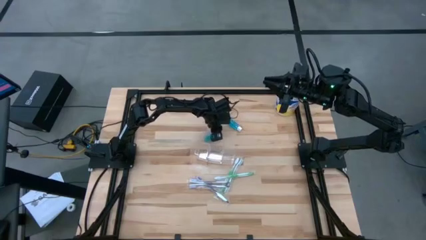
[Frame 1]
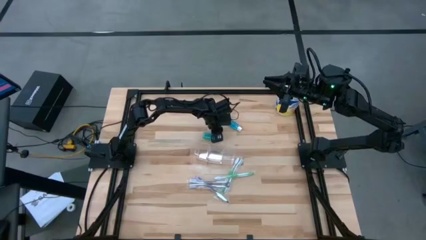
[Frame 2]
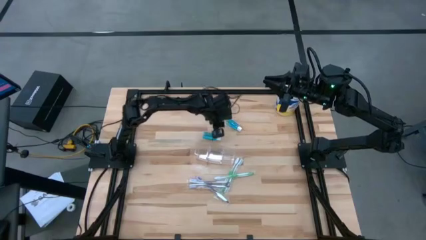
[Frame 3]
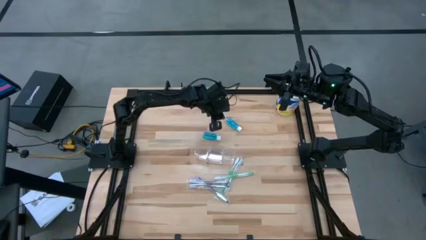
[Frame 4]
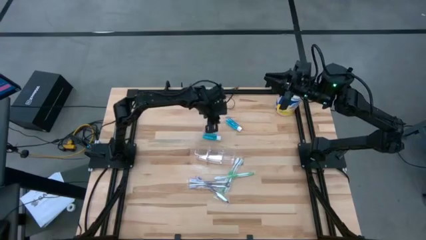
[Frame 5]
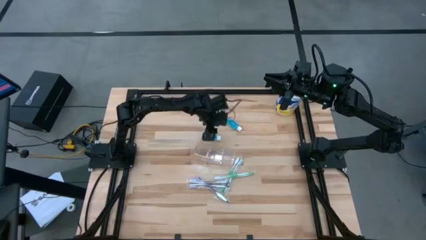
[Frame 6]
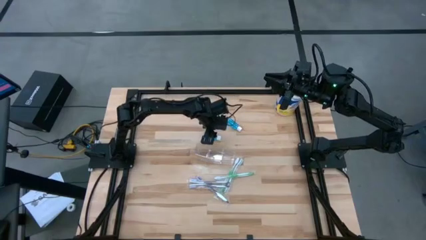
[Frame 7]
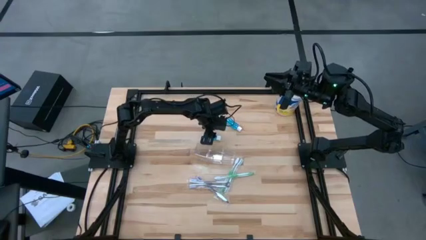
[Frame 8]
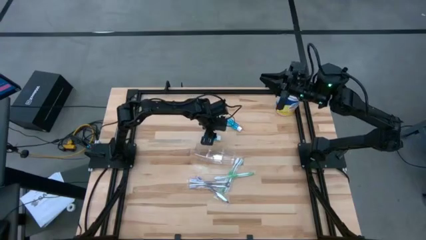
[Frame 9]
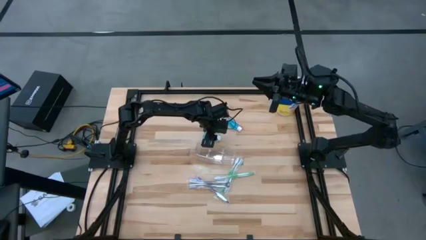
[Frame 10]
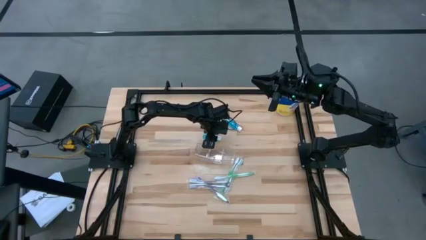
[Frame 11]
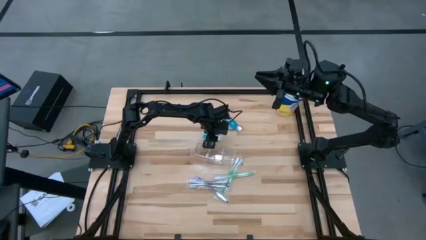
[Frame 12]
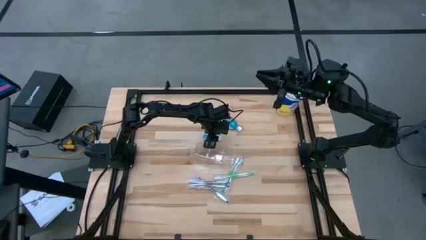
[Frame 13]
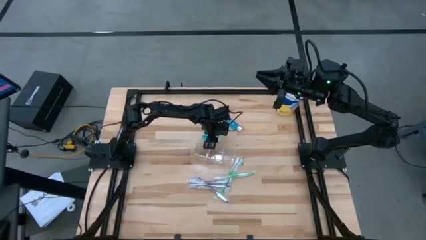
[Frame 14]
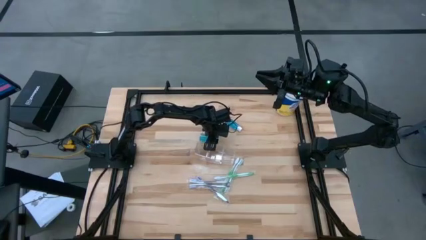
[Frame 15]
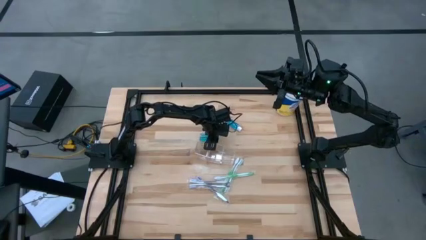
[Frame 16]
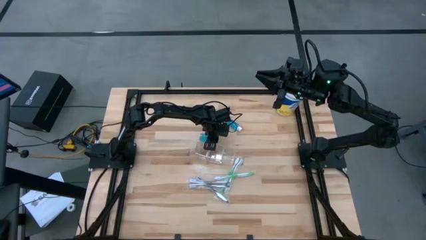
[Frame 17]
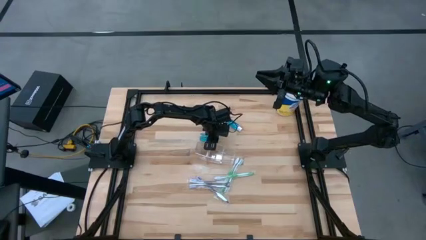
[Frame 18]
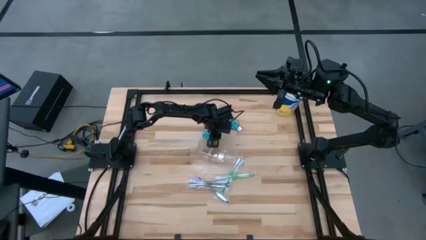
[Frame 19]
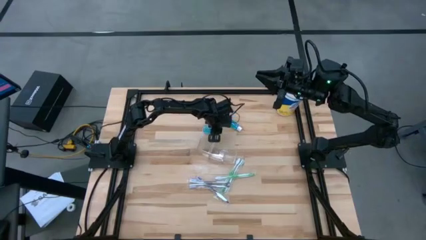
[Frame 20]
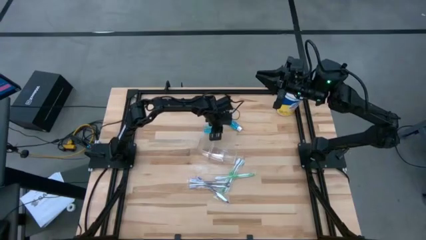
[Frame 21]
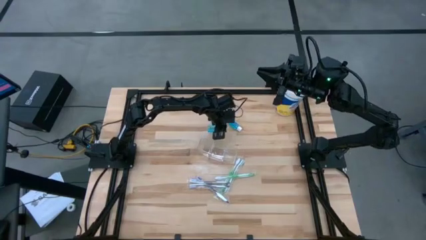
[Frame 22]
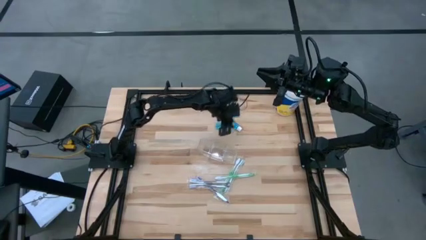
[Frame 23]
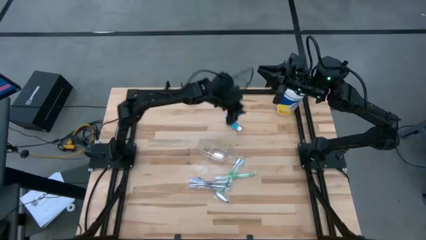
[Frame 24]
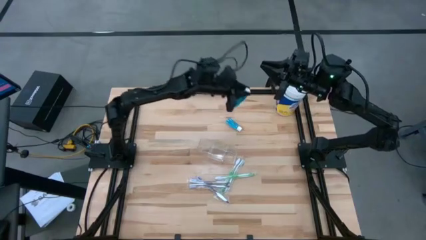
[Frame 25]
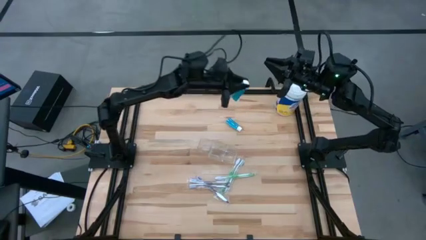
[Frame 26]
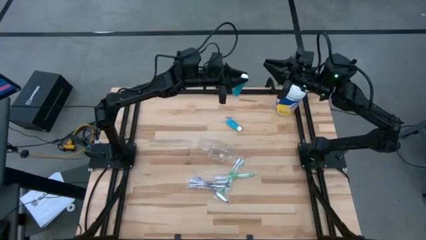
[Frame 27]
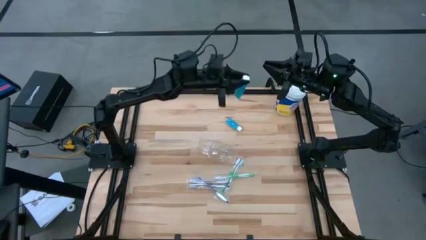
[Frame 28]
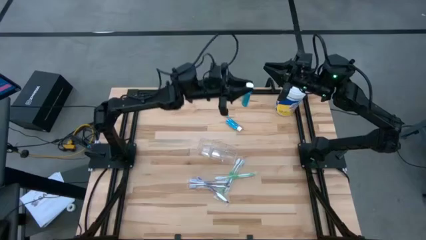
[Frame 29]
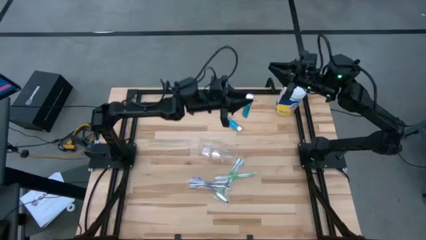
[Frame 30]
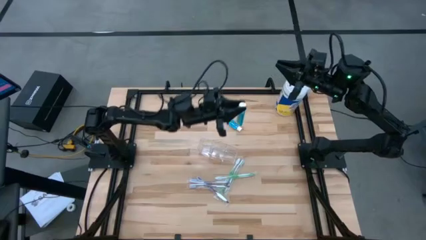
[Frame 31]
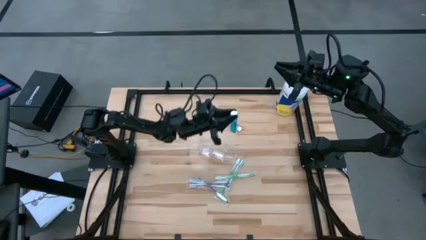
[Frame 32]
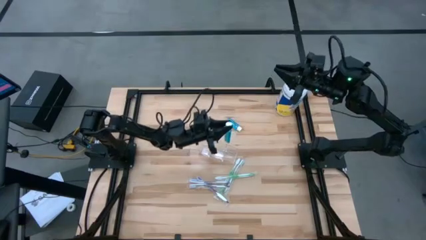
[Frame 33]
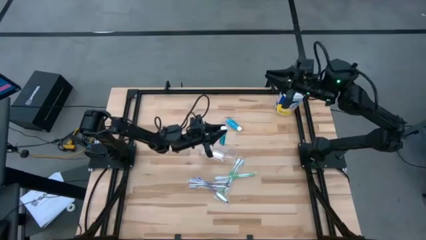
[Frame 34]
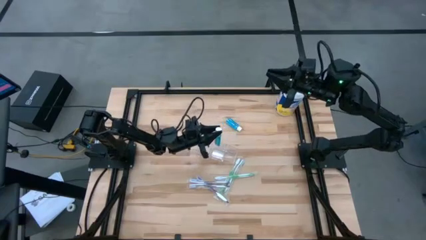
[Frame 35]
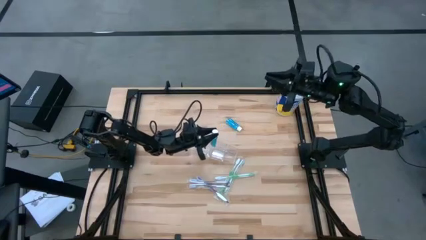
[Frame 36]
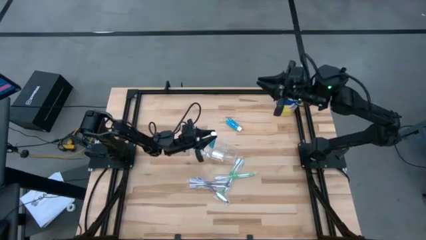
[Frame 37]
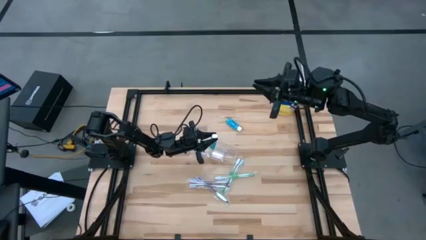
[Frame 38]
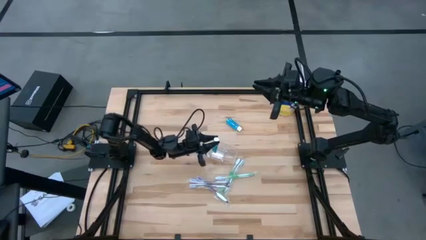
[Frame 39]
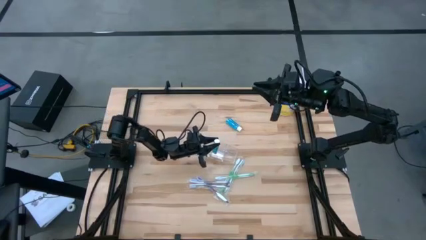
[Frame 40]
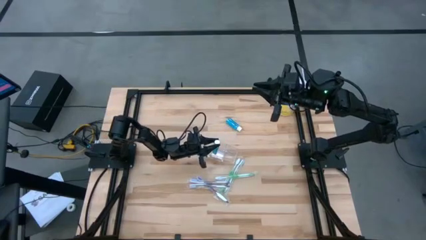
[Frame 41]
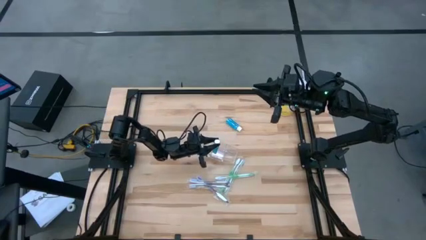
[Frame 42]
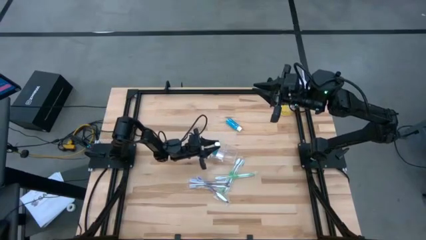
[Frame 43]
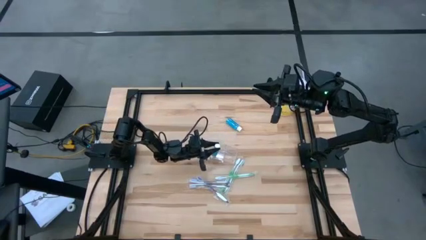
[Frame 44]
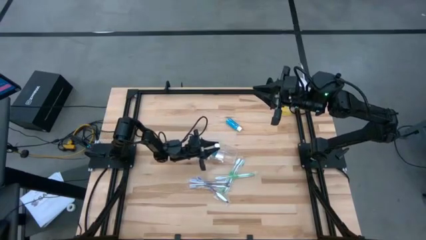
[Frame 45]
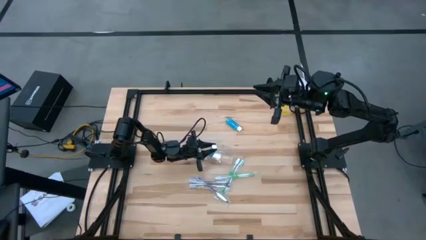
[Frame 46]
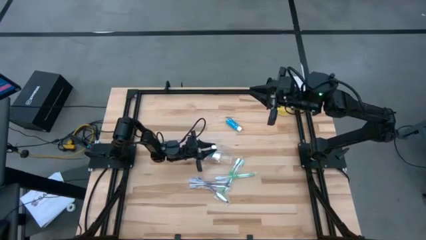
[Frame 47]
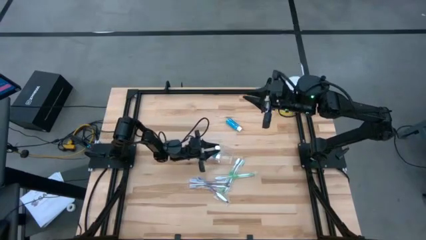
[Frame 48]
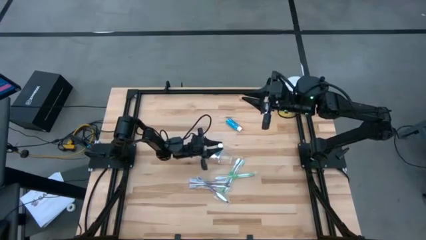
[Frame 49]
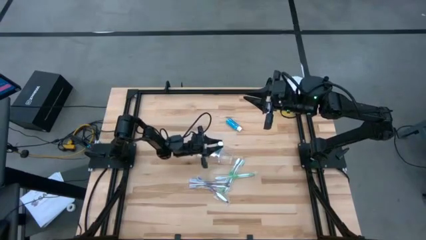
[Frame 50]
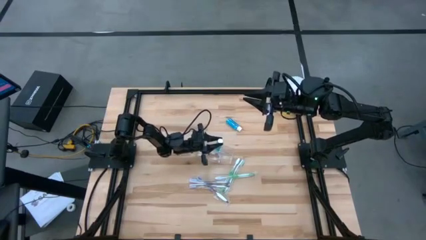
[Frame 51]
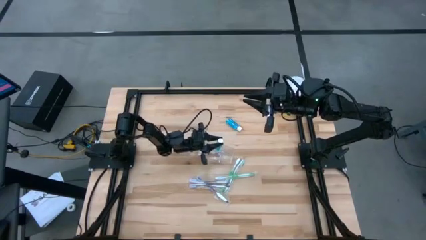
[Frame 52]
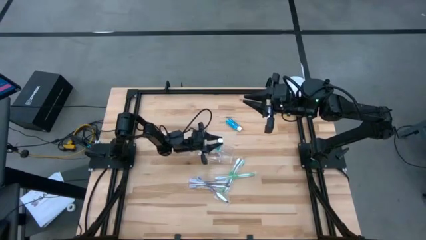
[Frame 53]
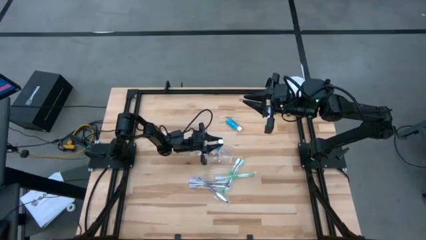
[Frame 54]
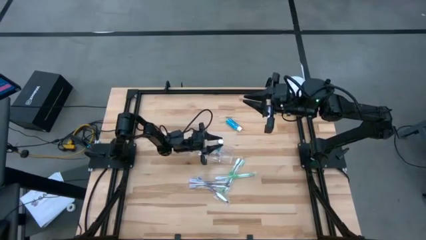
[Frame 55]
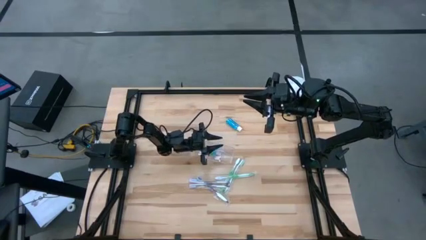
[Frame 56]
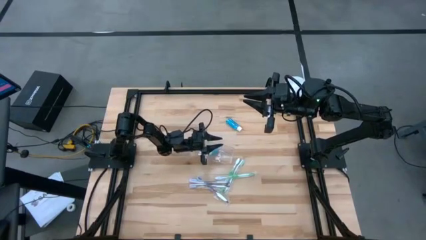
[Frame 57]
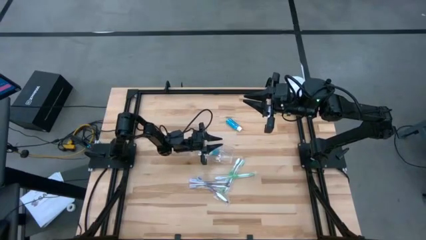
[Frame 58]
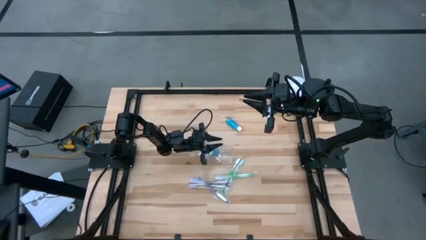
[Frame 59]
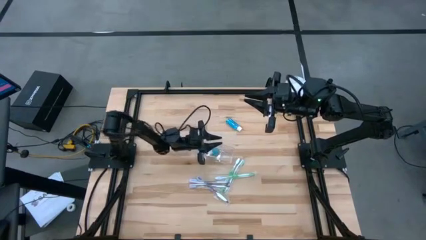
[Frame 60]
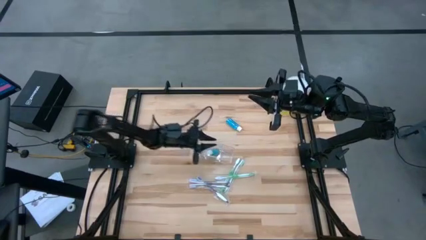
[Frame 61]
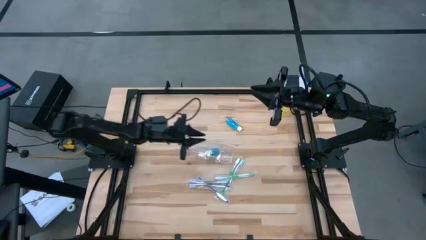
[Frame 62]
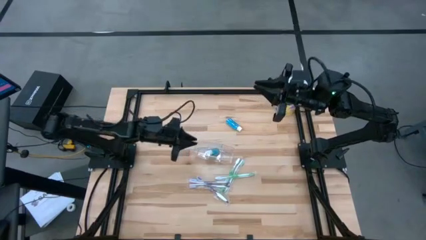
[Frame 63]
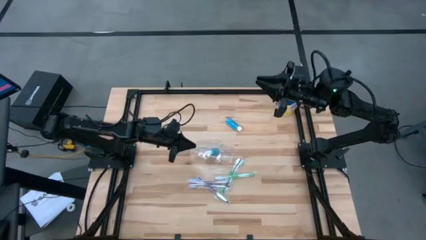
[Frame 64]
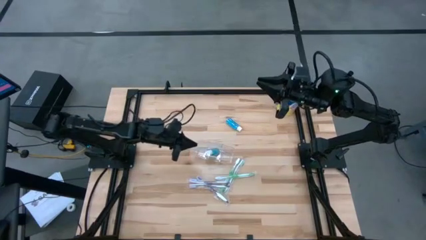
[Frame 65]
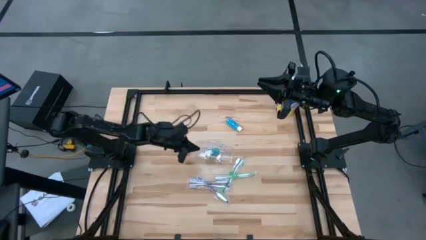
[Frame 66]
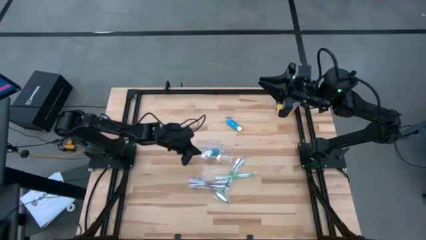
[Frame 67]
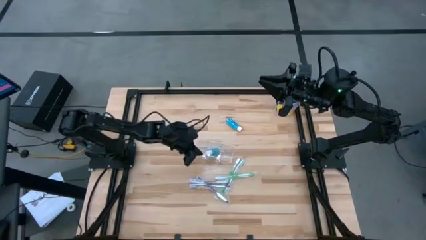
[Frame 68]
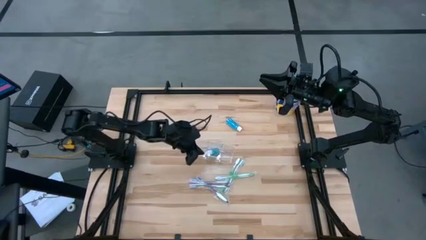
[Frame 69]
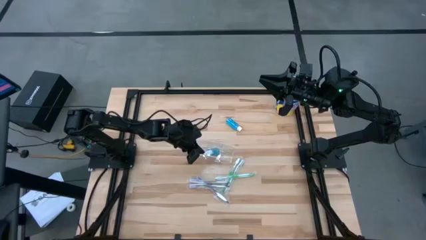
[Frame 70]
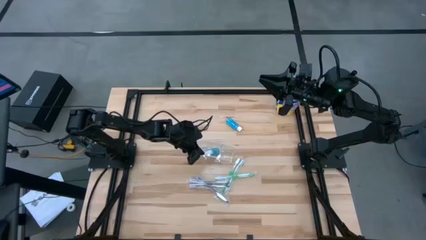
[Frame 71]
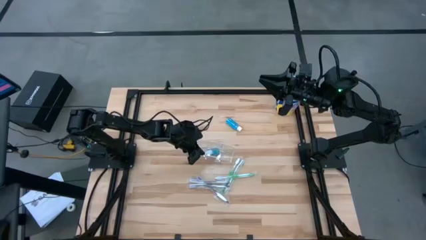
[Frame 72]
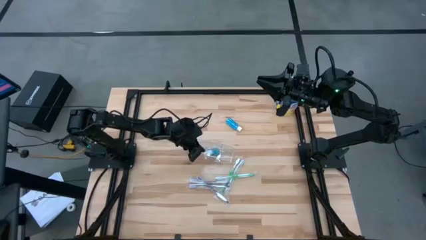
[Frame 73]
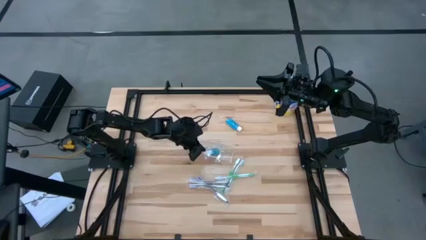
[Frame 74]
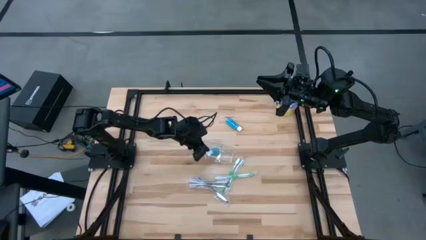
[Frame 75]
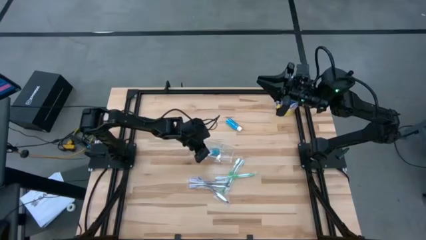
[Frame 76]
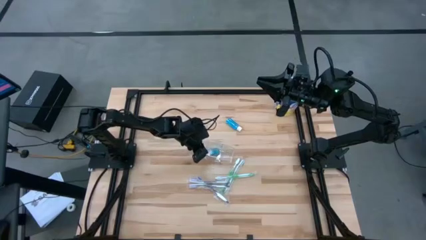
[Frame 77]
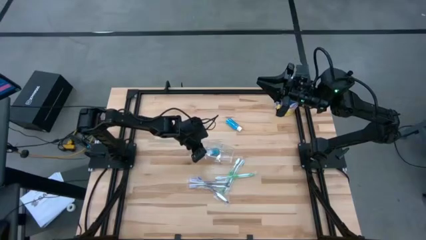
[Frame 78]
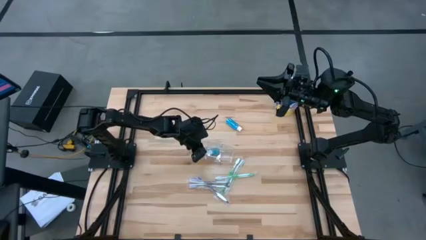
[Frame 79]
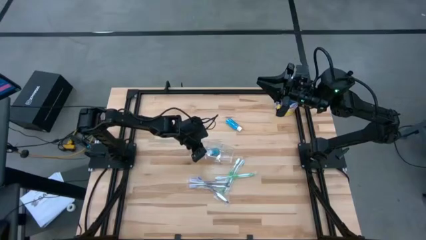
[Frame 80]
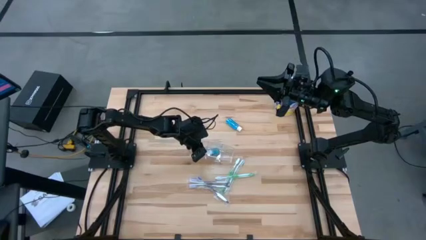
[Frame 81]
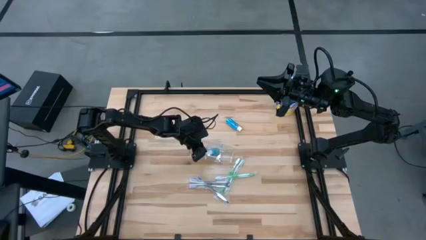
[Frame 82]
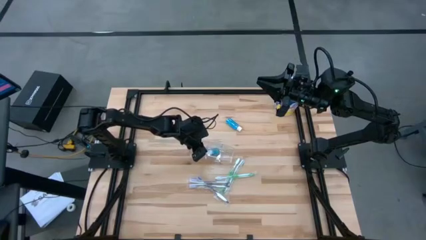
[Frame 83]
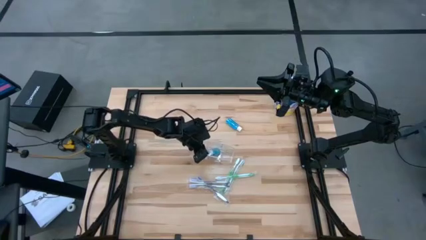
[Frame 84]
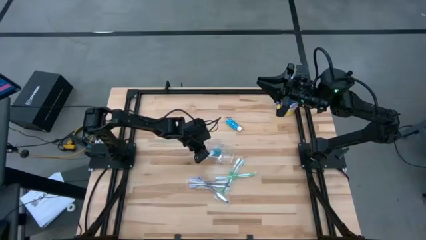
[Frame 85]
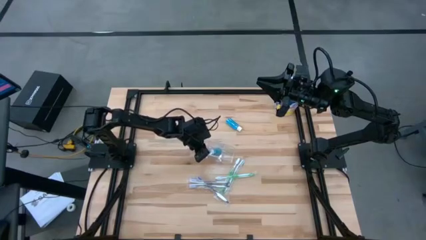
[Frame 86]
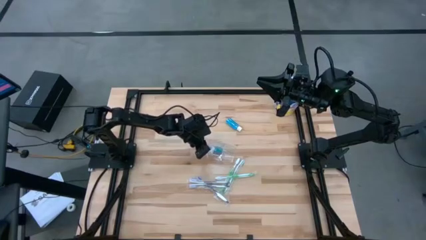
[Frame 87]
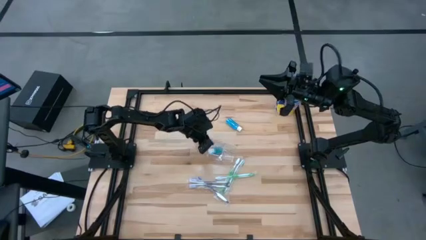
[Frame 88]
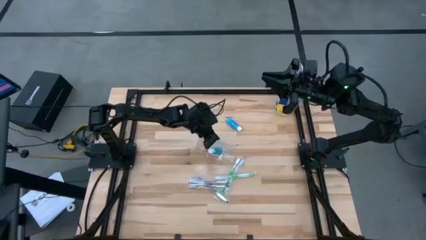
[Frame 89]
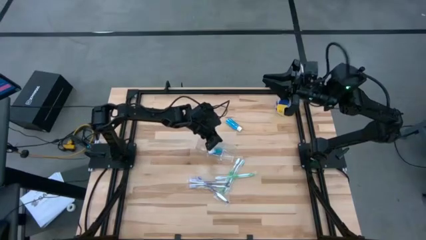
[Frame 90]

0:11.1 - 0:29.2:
Task: Pick & Place toothbrushing station
Put the bottom blue mouthwash bottle into the transparent organizer
